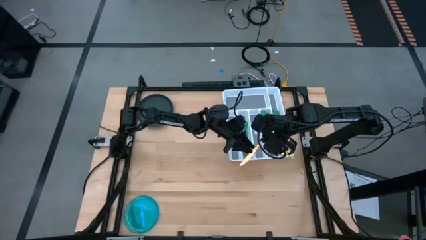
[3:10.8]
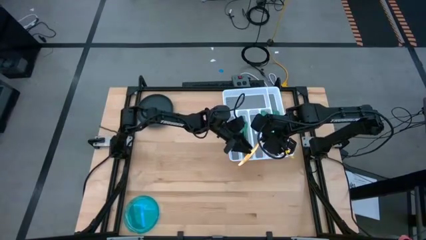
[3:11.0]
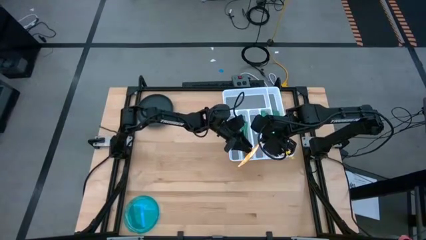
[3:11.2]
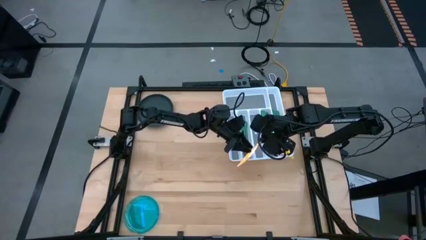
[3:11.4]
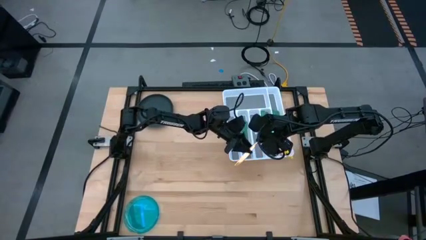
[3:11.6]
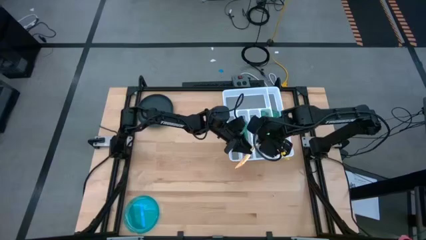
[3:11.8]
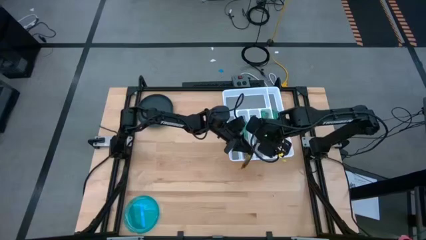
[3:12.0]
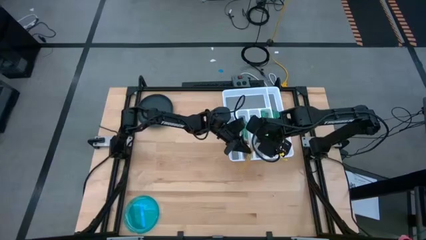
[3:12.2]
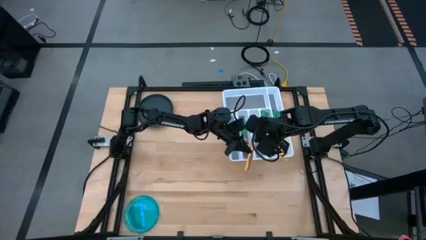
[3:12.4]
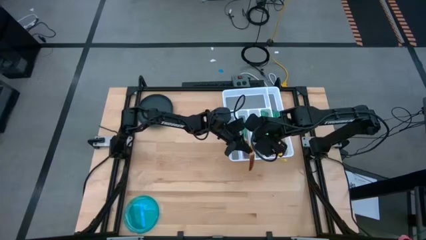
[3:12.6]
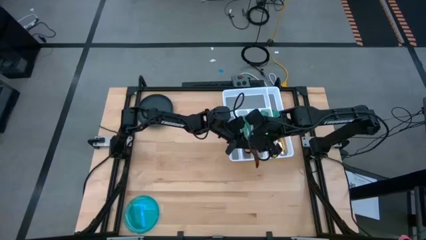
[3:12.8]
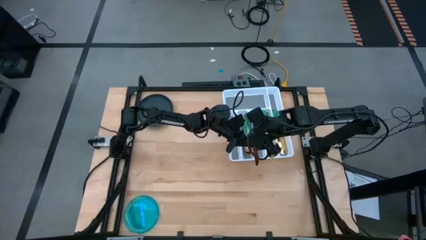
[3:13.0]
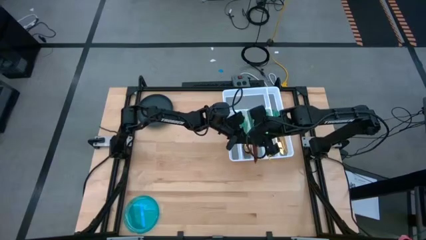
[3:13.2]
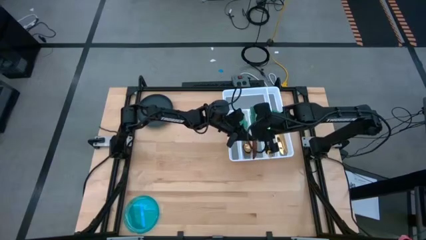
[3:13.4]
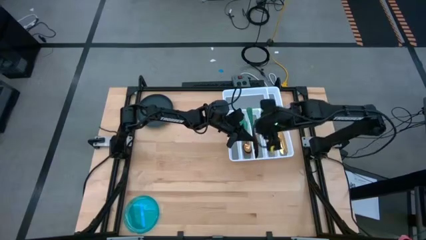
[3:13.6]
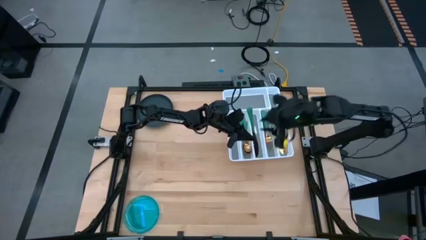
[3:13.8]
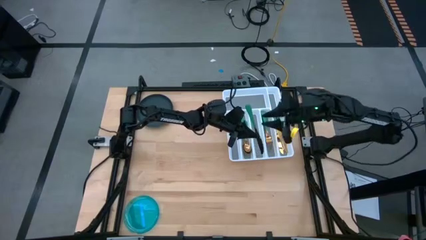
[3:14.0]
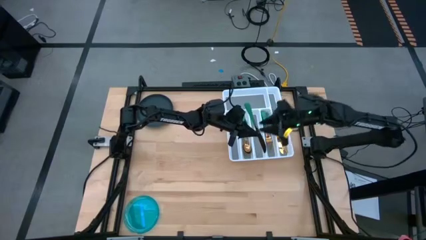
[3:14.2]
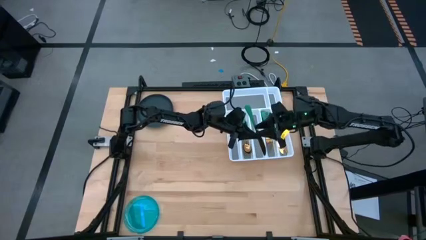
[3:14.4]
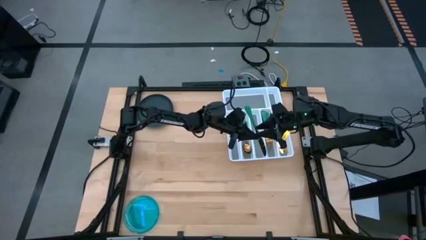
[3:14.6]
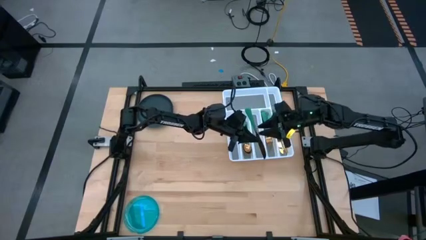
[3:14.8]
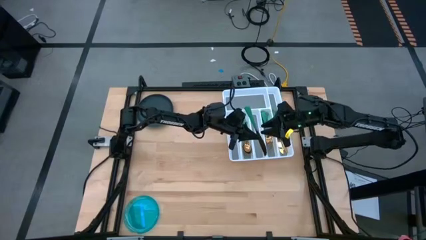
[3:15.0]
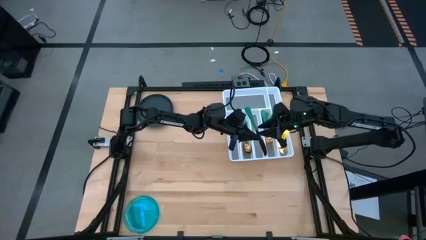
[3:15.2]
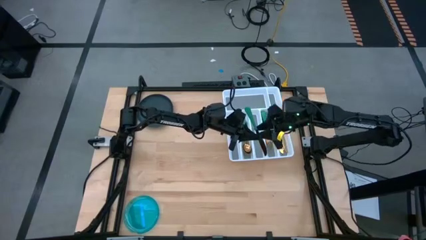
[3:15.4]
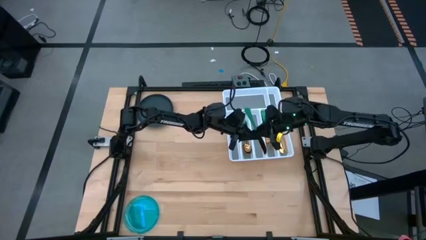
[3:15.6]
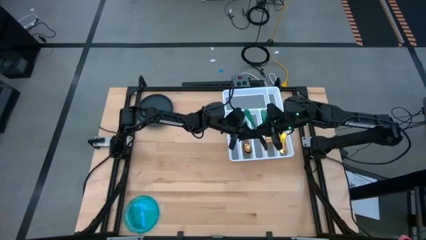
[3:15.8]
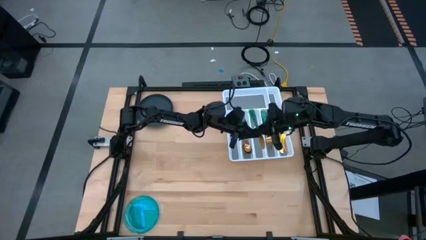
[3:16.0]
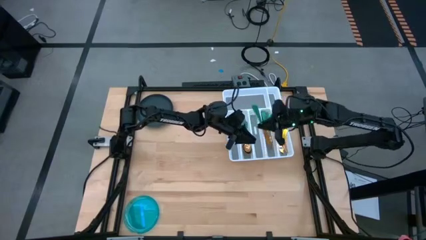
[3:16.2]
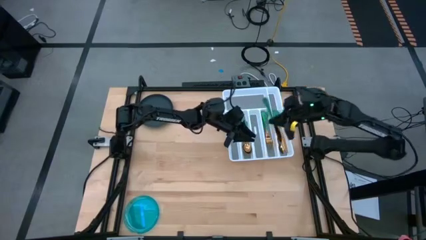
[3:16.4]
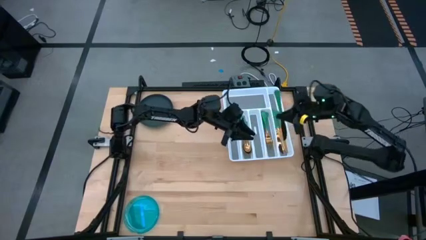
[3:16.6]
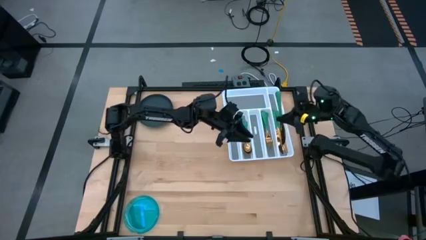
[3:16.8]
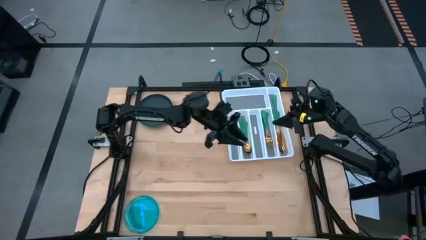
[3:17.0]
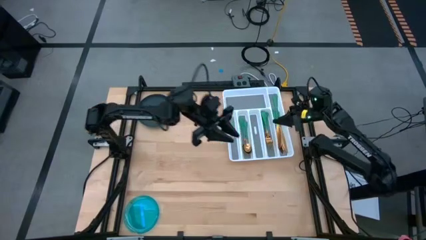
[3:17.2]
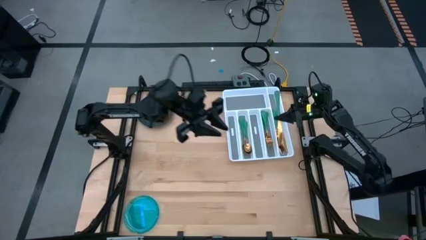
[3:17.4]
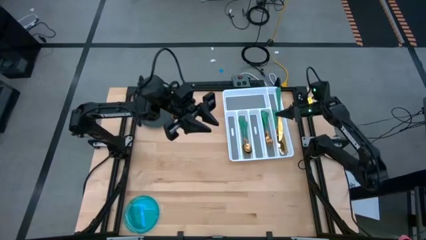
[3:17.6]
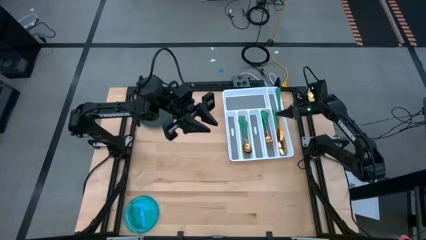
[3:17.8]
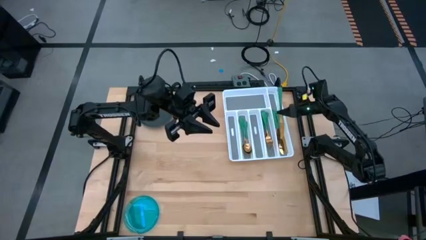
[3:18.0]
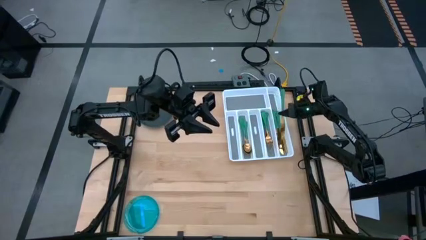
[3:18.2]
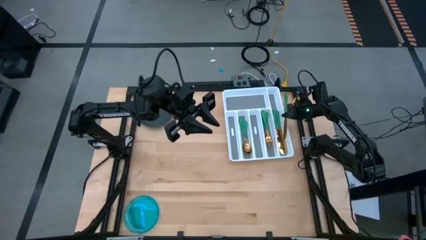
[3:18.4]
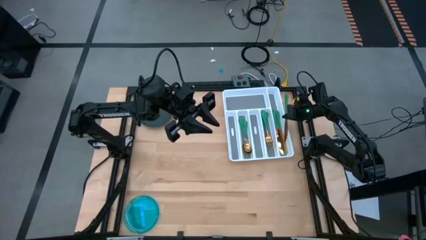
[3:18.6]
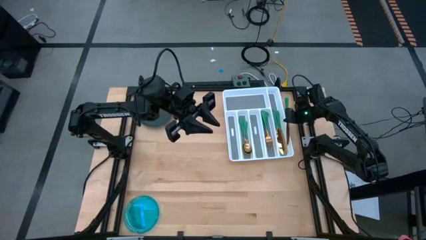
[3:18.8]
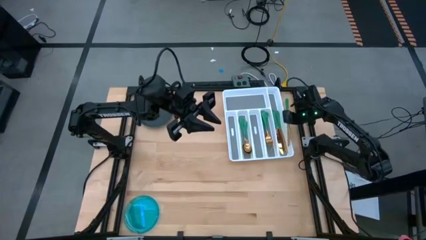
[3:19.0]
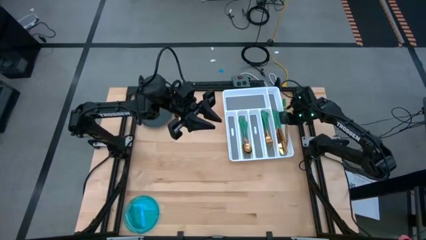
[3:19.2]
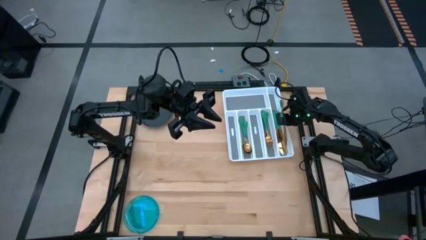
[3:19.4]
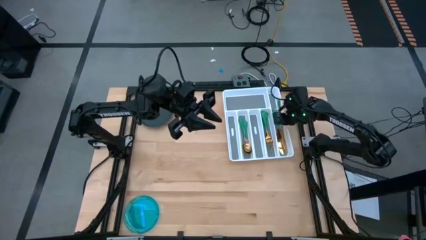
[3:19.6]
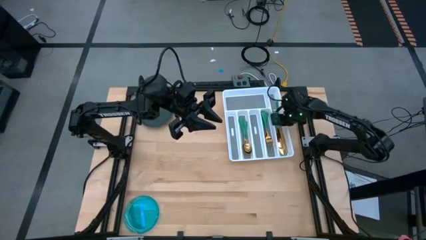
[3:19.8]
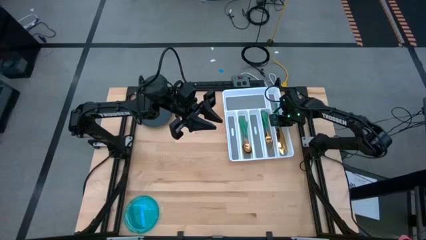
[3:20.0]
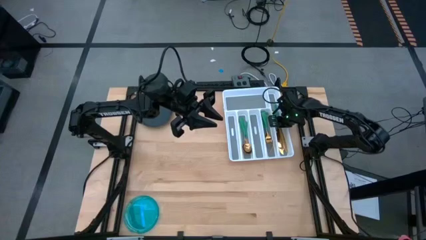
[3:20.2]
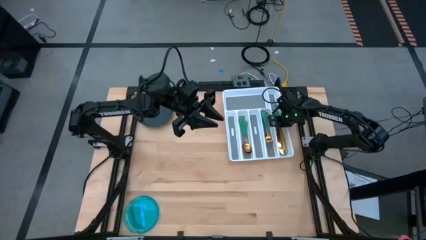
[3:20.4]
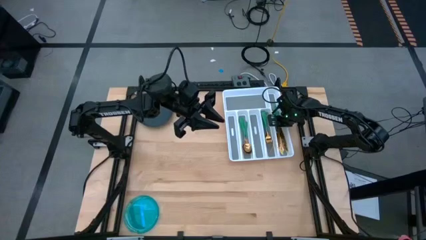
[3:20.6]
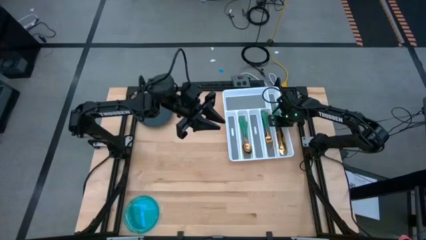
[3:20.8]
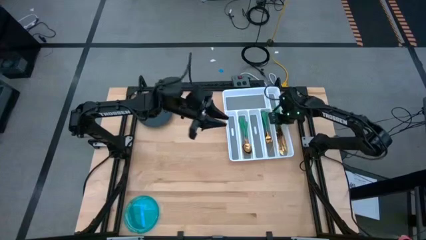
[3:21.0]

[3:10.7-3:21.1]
Task: Sort silverware
Put the green knife into the silverware tray

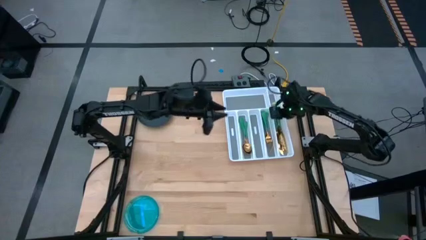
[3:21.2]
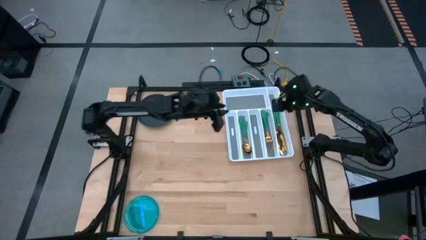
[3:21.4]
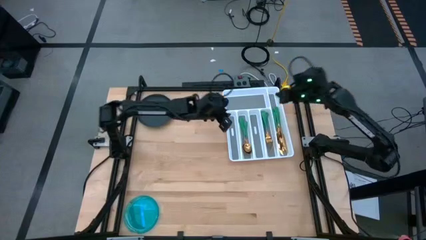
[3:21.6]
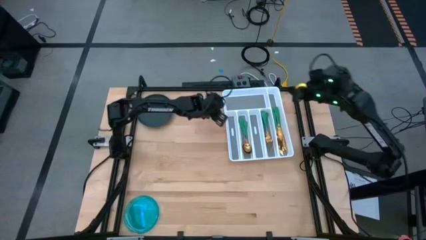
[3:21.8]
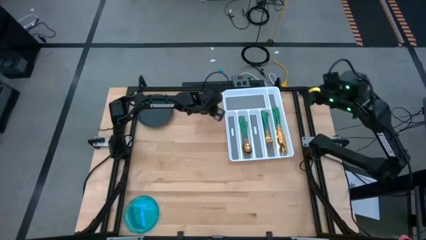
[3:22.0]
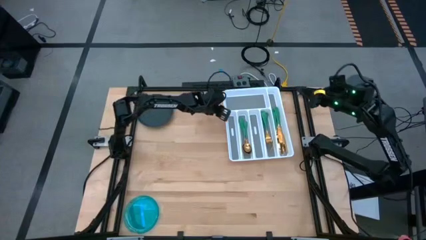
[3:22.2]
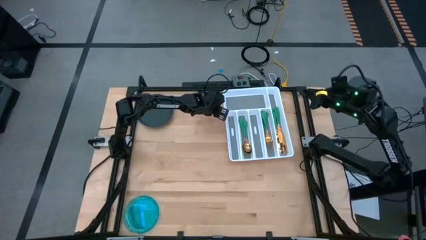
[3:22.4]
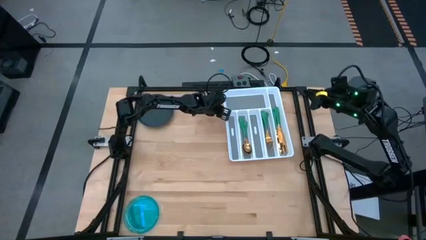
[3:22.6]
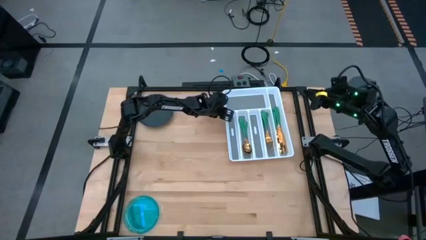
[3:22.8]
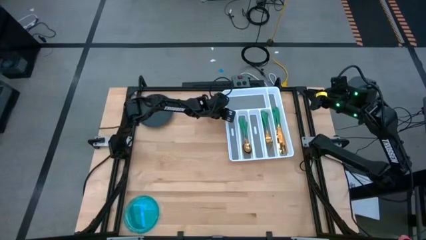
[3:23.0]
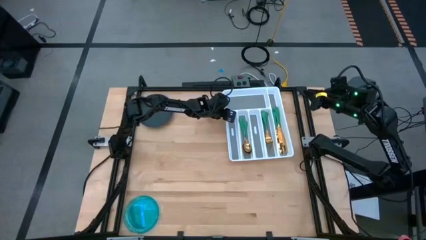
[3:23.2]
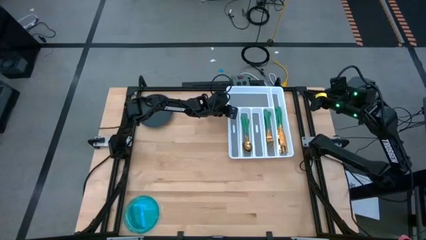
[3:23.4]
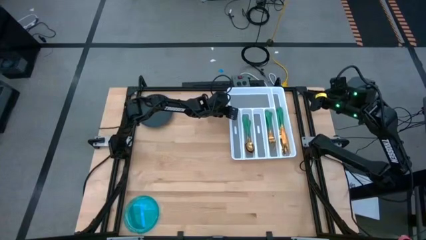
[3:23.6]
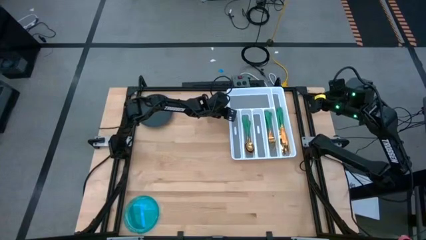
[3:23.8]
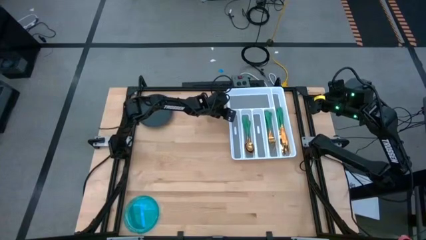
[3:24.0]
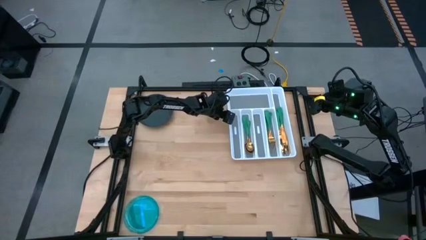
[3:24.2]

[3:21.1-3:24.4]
Adjust the silverware tray
